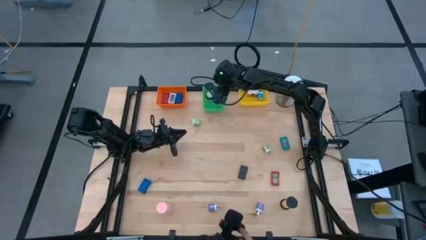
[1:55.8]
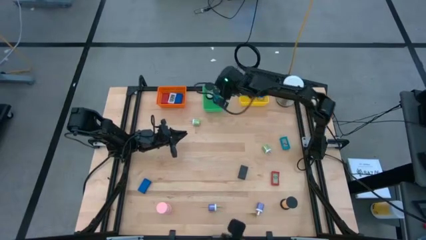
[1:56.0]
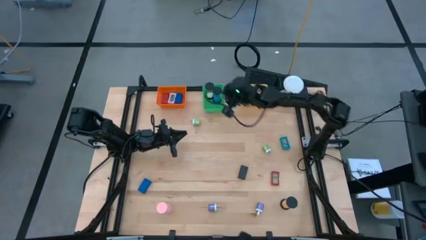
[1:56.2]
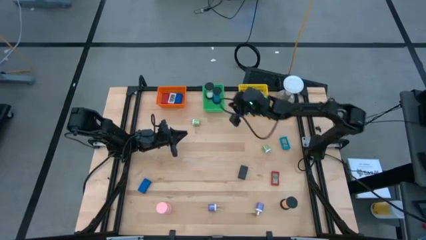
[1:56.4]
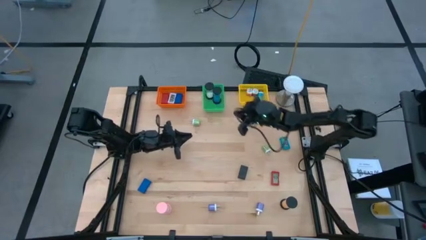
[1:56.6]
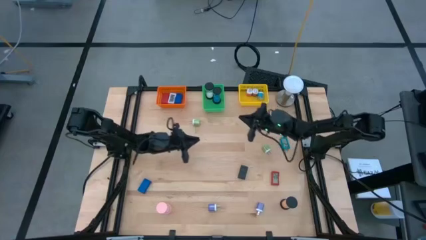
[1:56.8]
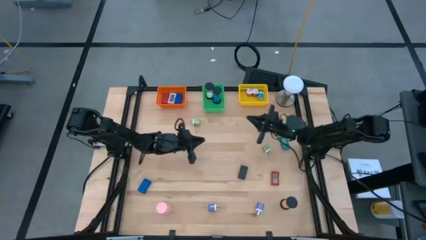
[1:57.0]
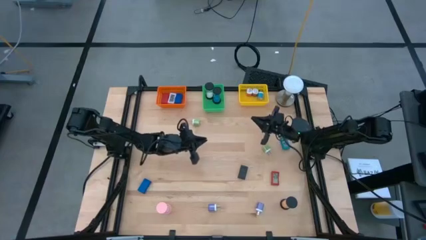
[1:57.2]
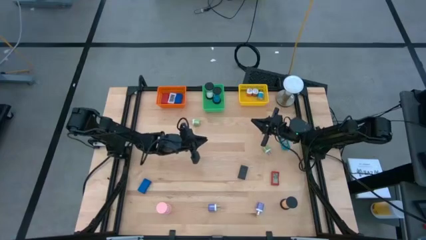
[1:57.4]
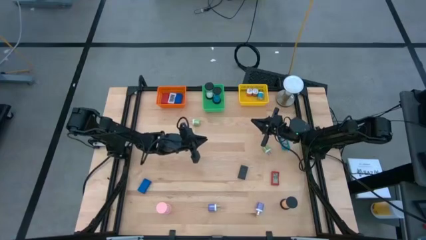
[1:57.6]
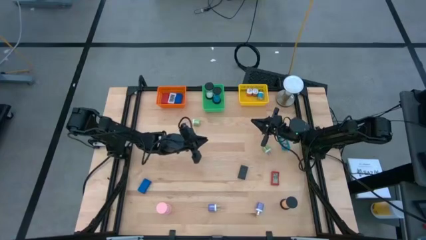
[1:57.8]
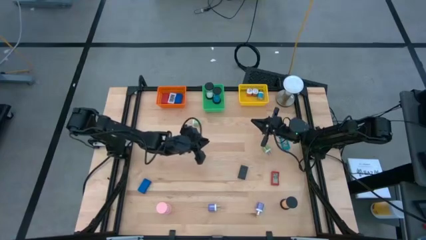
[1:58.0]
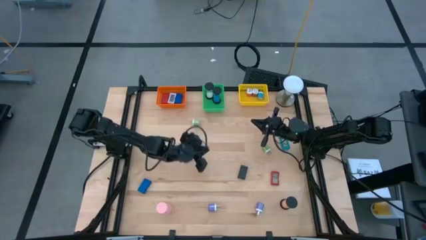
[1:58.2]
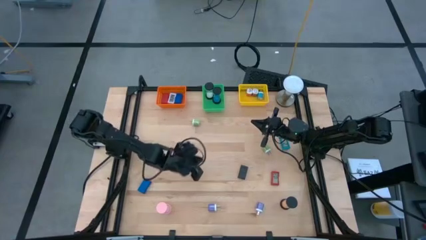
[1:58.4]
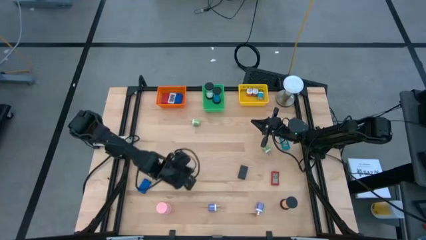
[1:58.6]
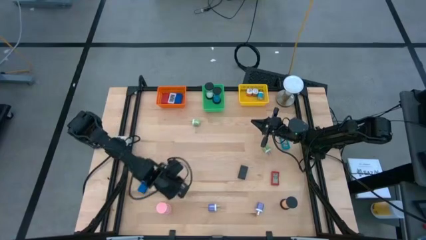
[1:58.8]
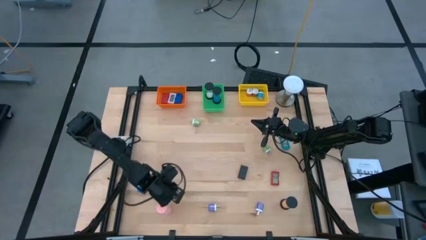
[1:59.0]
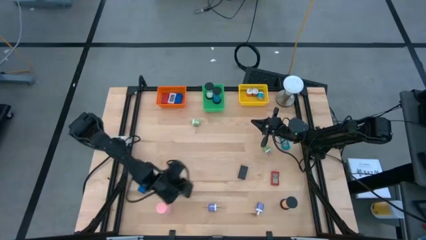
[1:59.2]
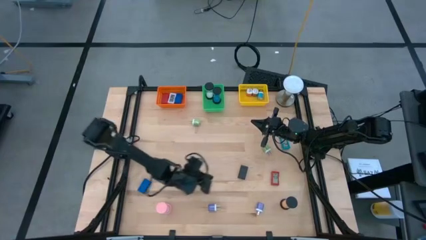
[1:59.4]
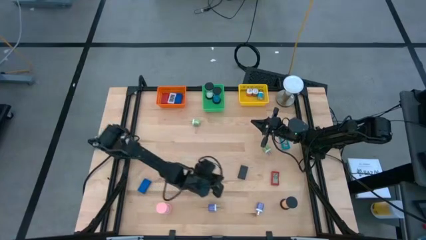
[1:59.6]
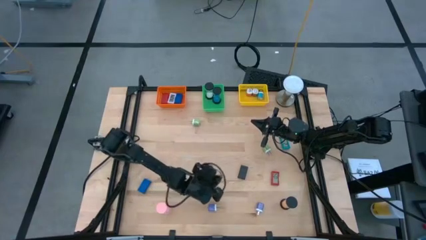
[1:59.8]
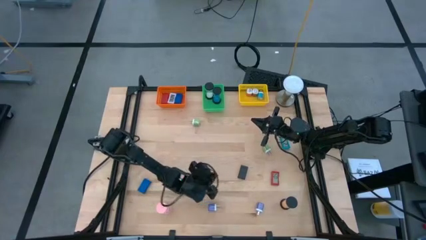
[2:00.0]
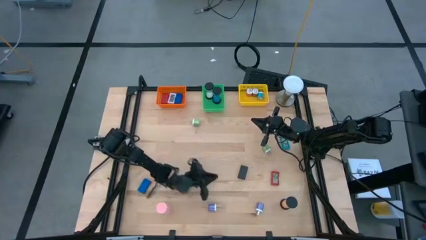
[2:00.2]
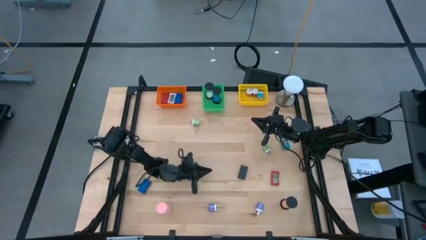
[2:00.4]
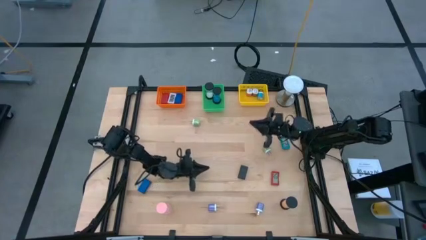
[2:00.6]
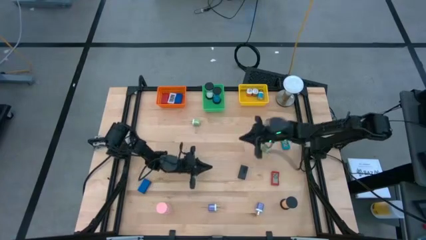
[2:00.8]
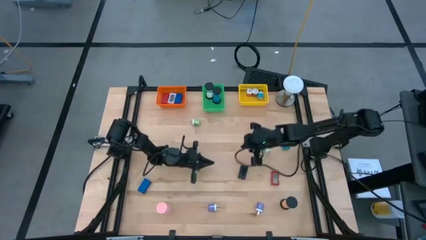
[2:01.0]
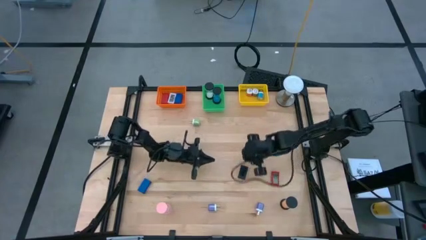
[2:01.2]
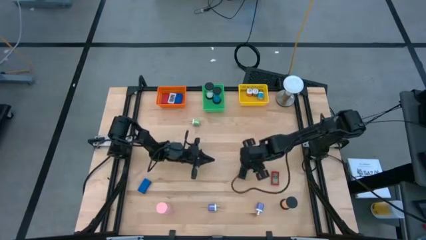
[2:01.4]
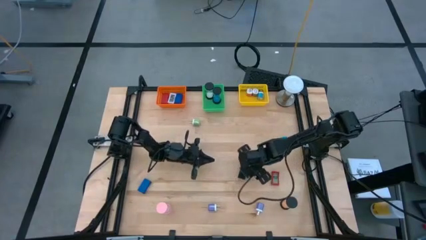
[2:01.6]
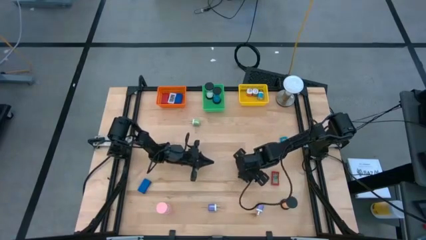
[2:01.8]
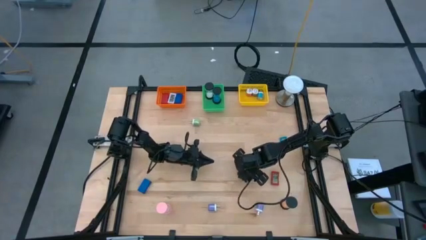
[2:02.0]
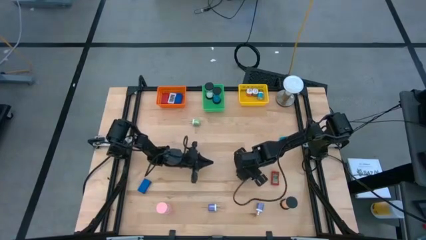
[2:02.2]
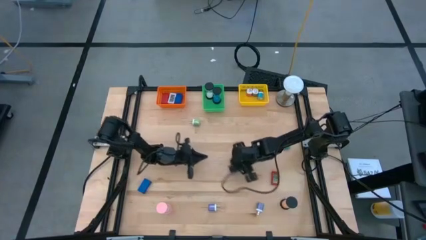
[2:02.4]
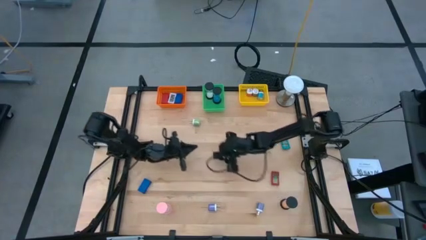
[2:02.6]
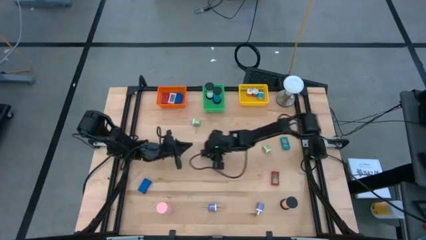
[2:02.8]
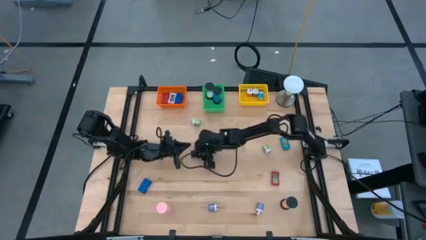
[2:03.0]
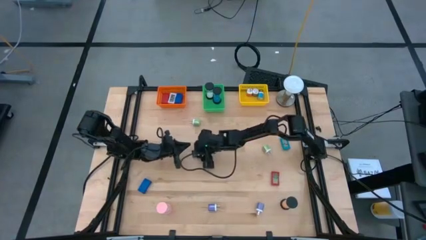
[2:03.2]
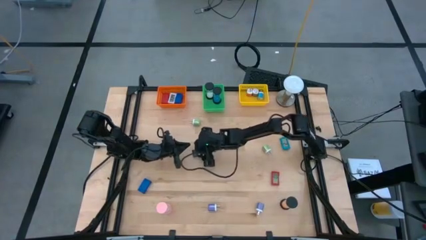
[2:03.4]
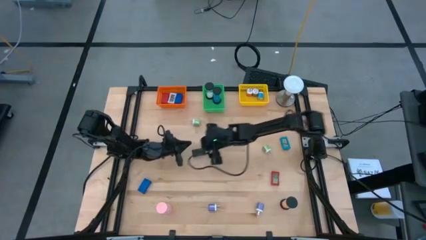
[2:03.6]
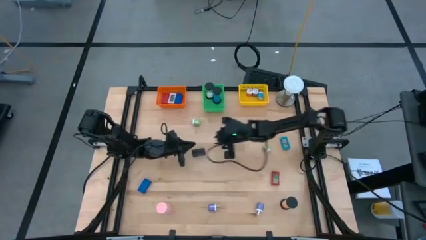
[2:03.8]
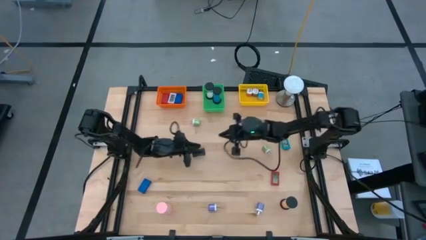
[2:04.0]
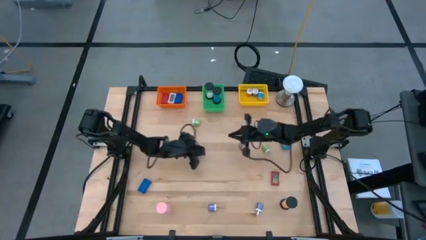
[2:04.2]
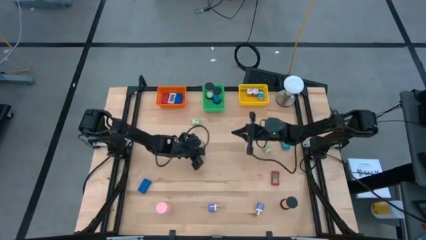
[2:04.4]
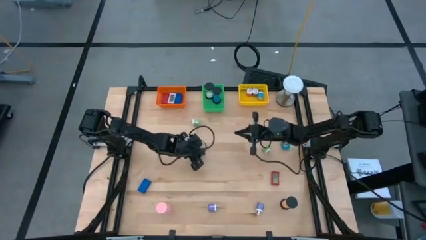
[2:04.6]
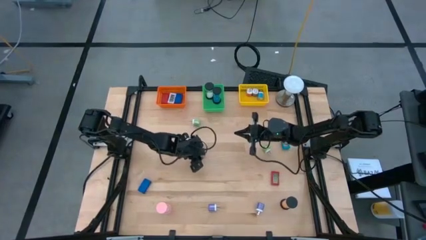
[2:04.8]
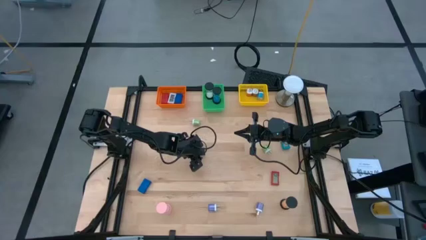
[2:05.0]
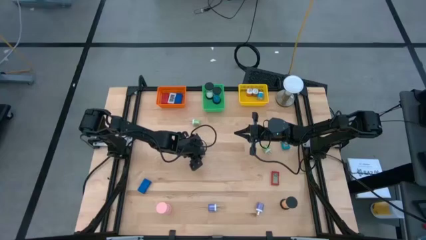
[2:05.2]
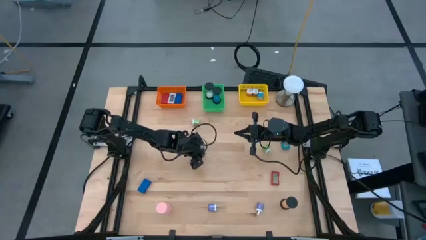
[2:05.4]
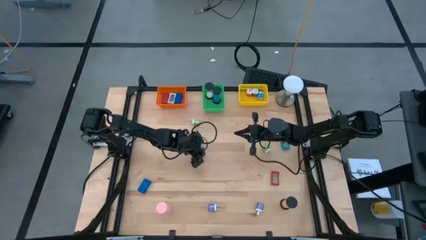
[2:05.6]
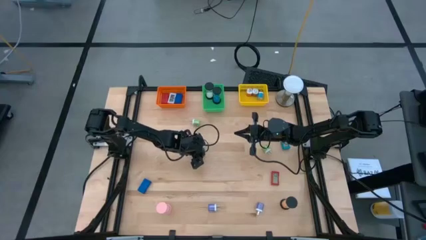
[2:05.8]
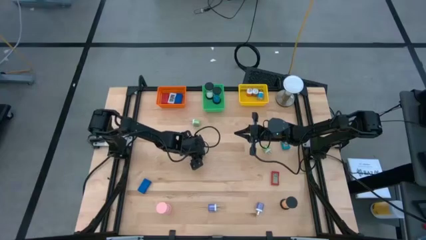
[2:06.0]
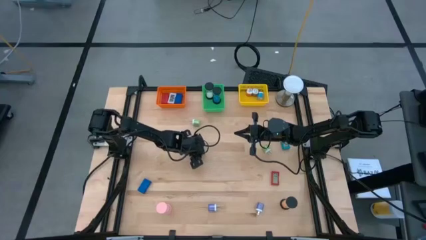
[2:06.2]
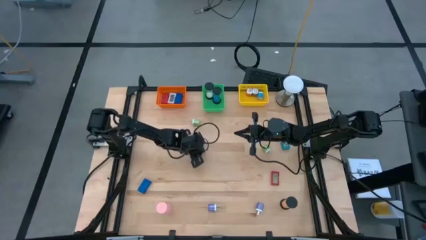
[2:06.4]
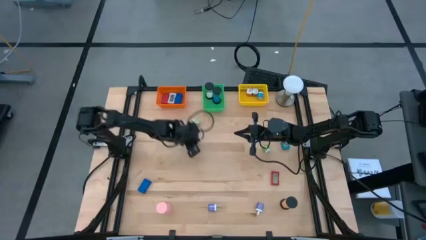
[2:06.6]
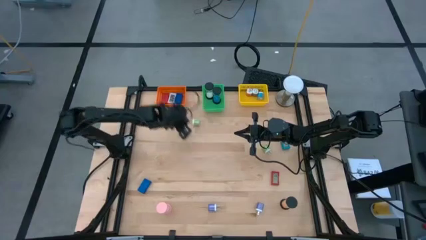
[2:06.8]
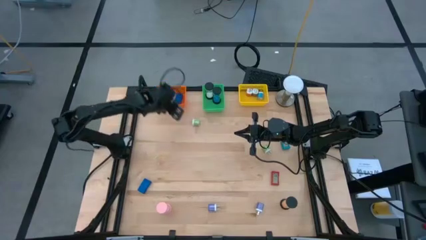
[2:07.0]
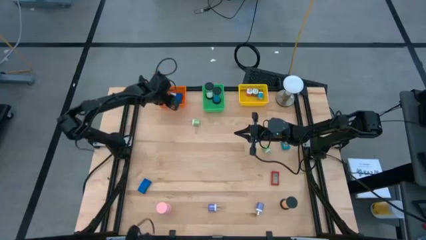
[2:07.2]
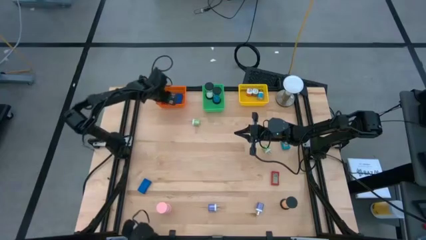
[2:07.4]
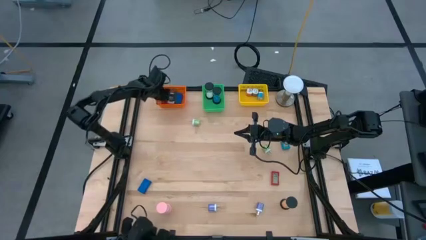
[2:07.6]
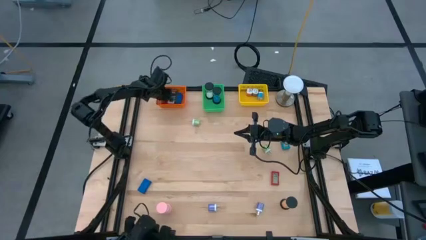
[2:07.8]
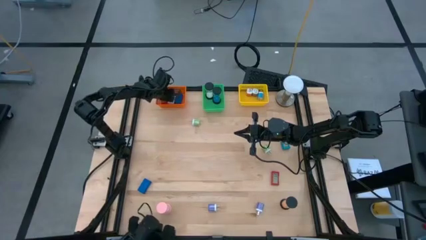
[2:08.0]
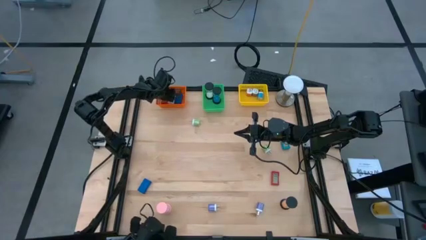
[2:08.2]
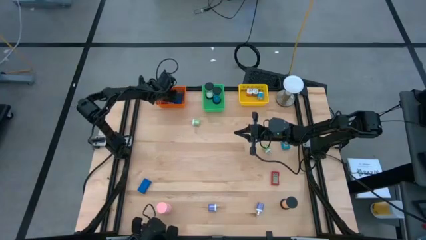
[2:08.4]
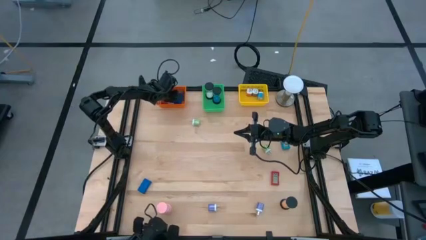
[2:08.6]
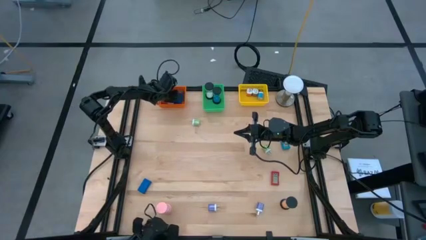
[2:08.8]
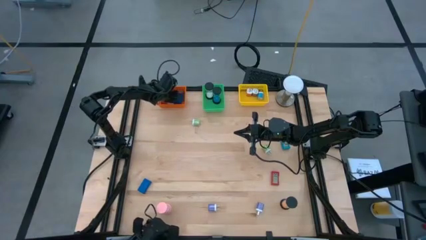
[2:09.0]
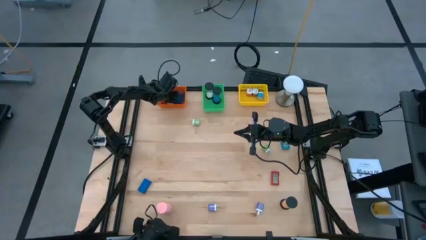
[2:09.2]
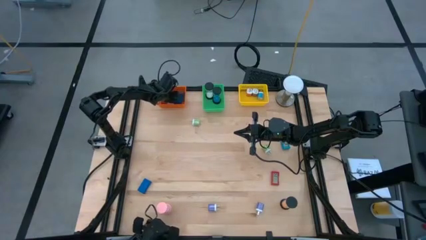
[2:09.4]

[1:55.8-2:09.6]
Task: Pick & Place Office items
Put the black digital clock into the orange bin
